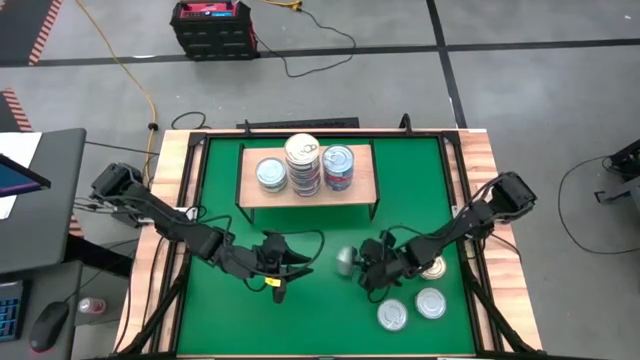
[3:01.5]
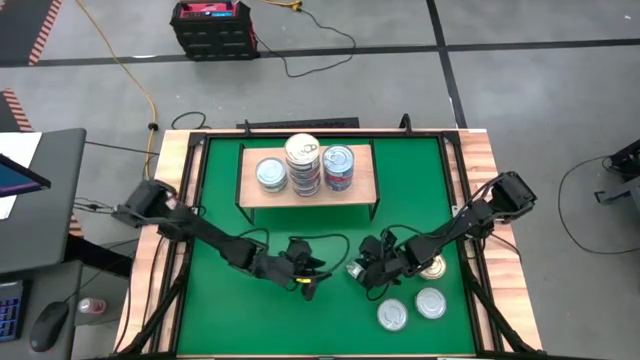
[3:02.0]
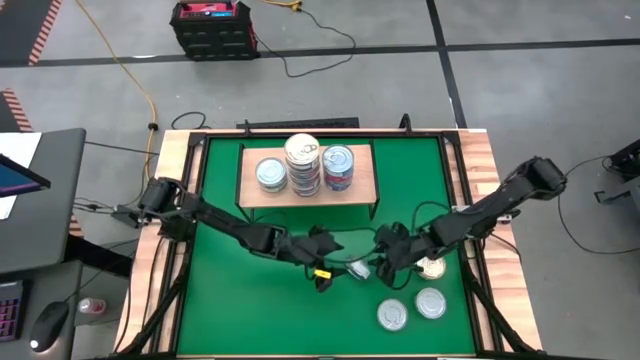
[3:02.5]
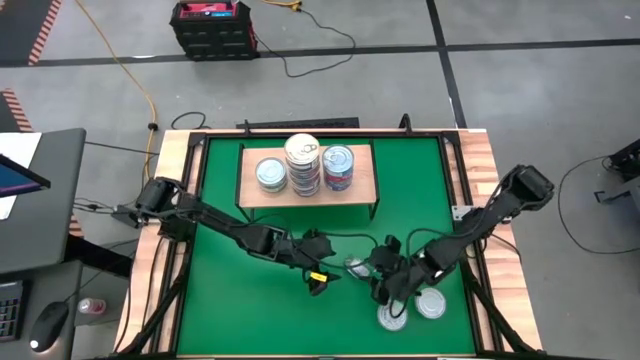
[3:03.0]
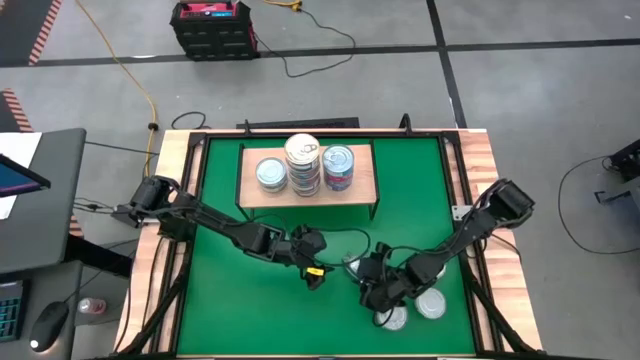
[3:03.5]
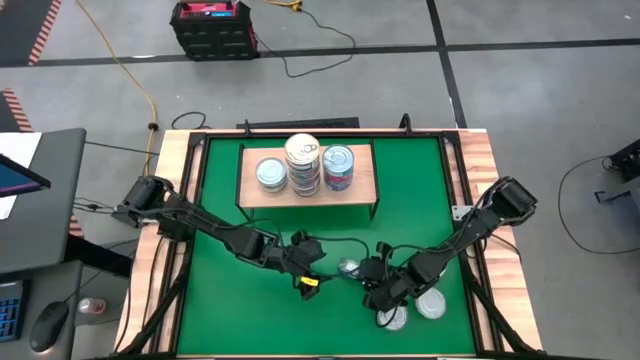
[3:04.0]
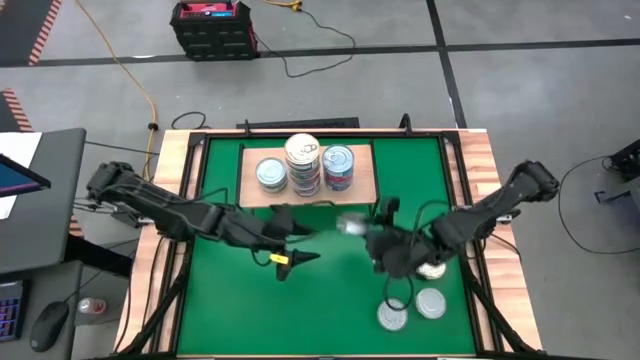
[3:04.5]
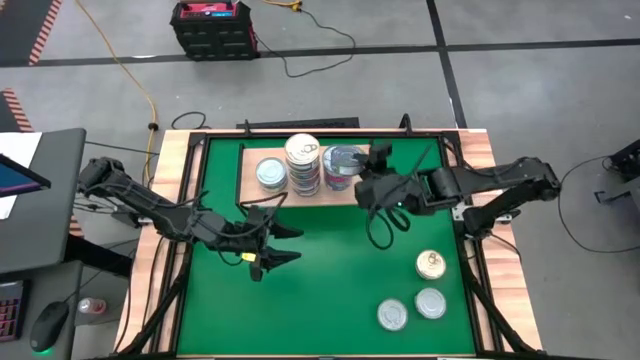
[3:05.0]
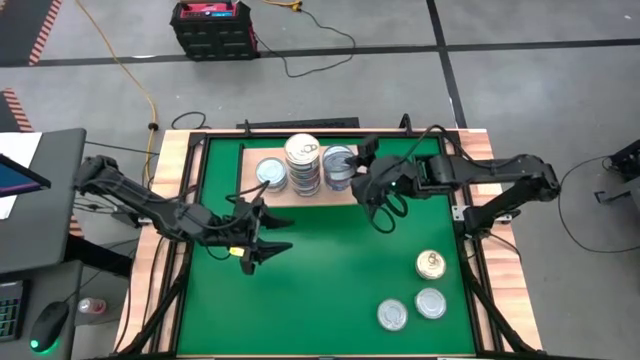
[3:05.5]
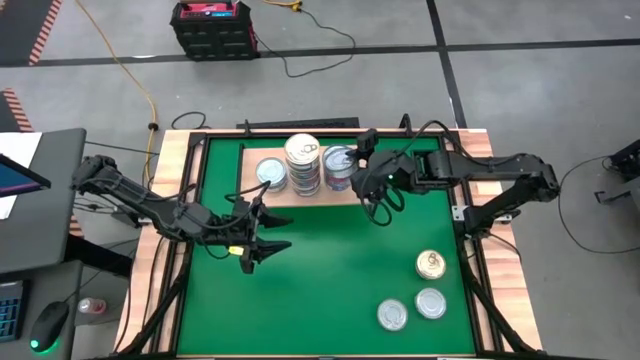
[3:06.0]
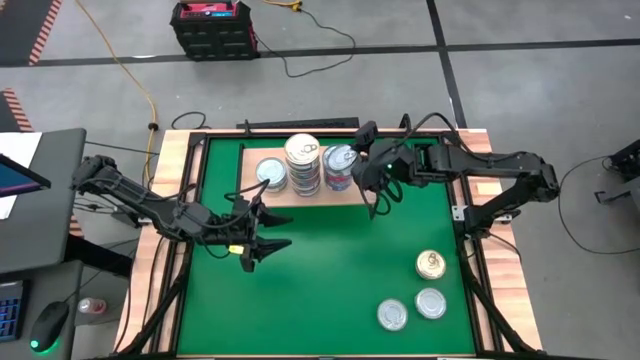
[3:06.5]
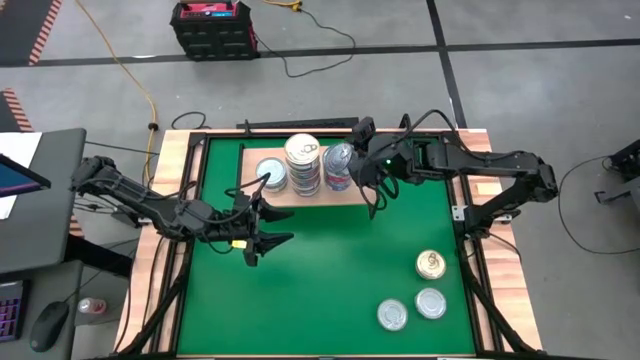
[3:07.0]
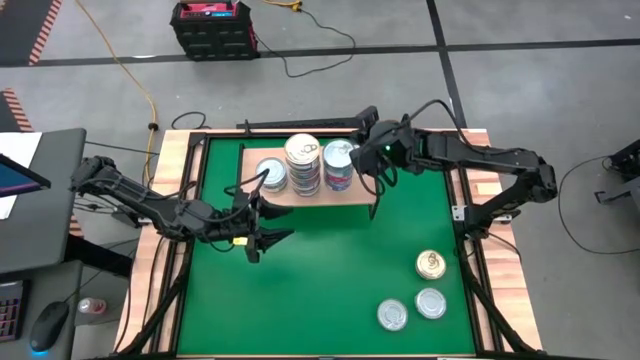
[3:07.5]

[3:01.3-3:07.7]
Task: Stack canned seafood by type on shelf
Stack the green tuna can on top of the colored tuna cans

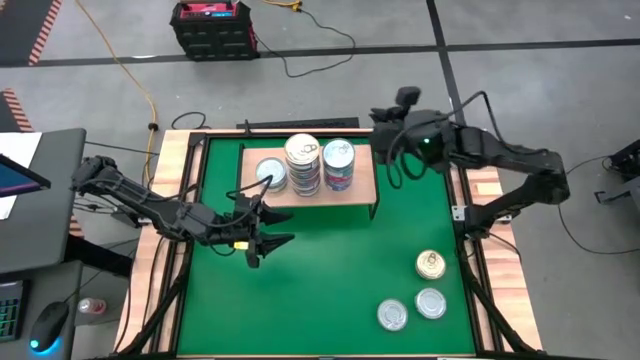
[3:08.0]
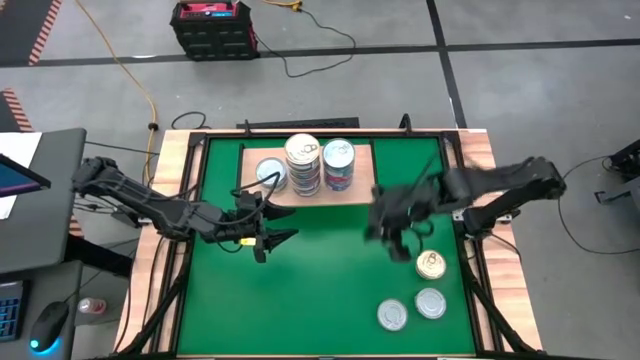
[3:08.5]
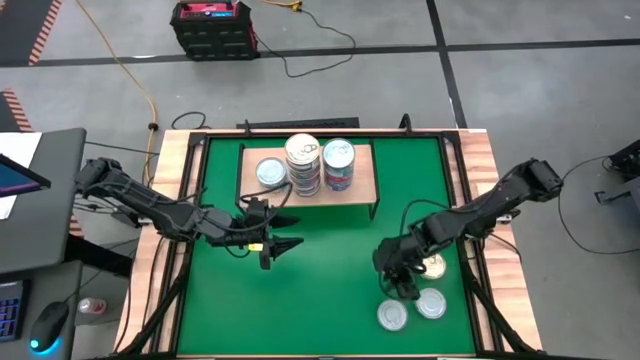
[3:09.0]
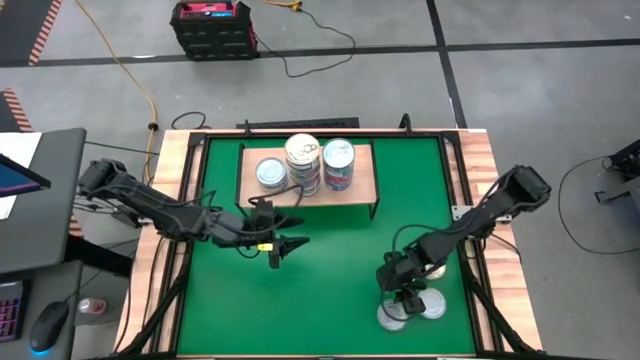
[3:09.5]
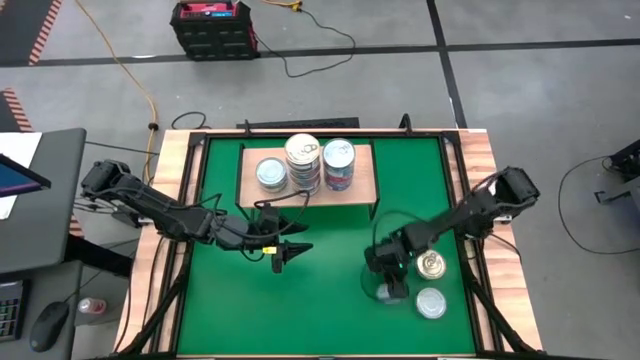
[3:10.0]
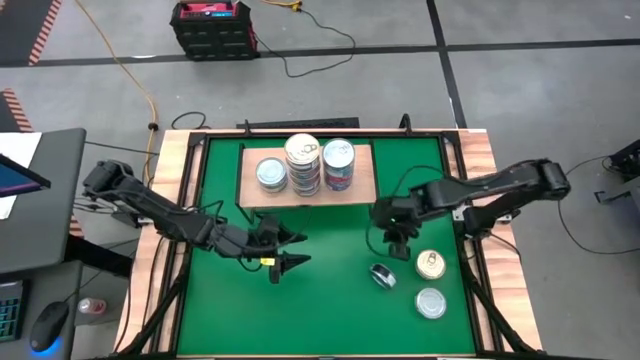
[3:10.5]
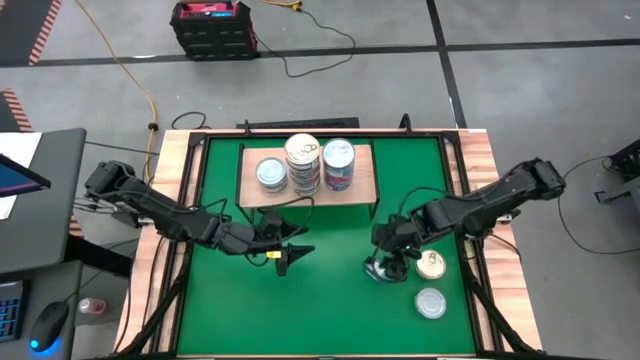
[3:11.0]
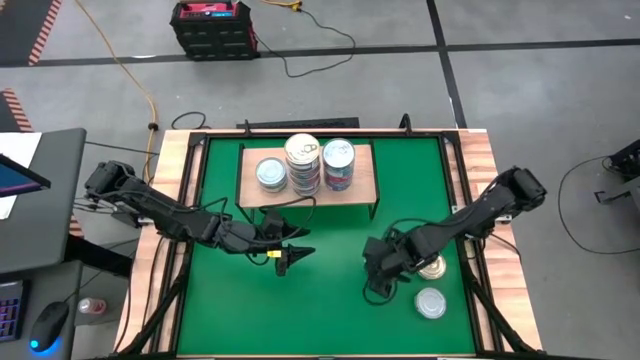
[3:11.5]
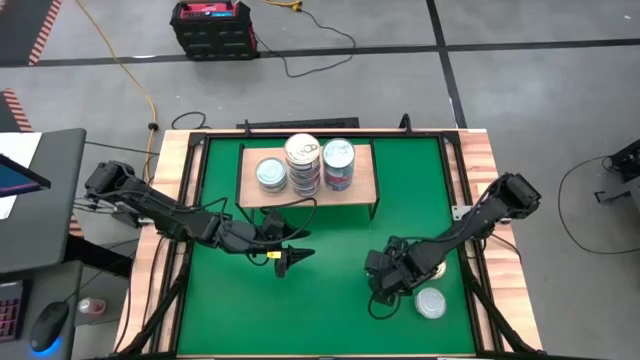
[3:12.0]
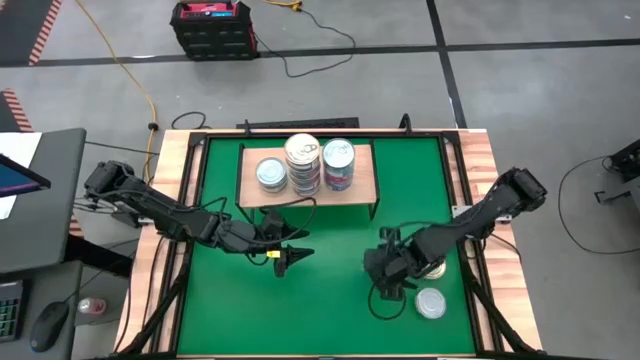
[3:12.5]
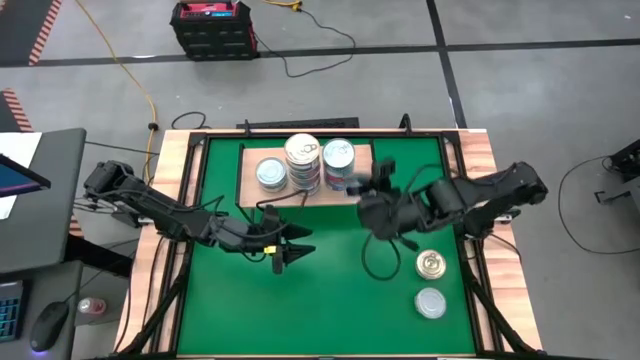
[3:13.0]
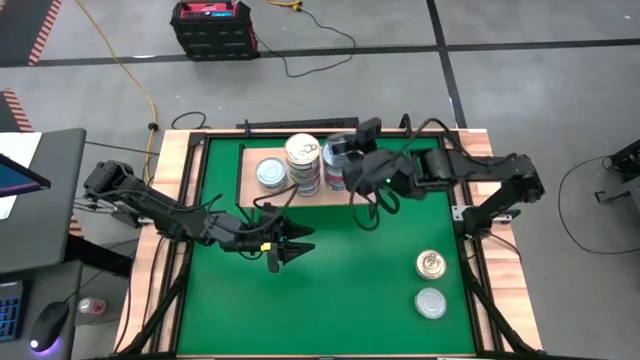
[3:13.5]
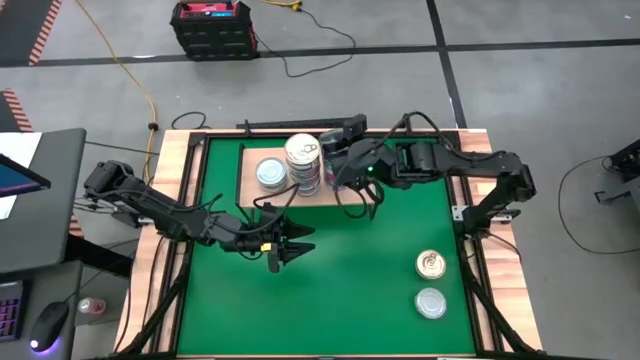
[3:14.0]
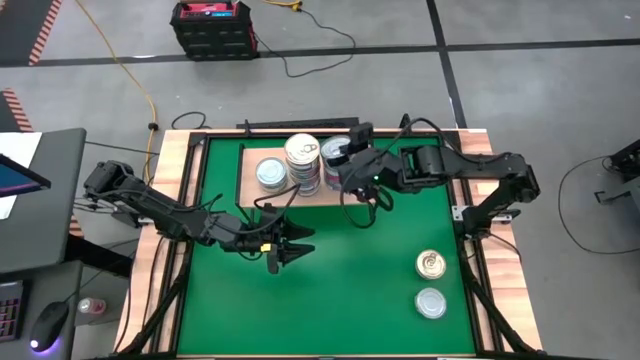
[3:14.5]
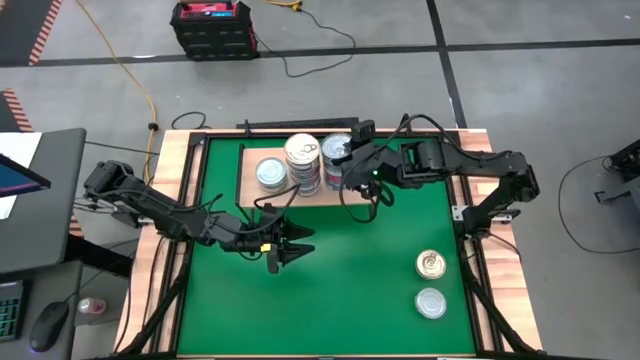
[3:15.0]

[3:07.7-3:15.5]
Stack the blue tuna can on top of the colored tuna cans

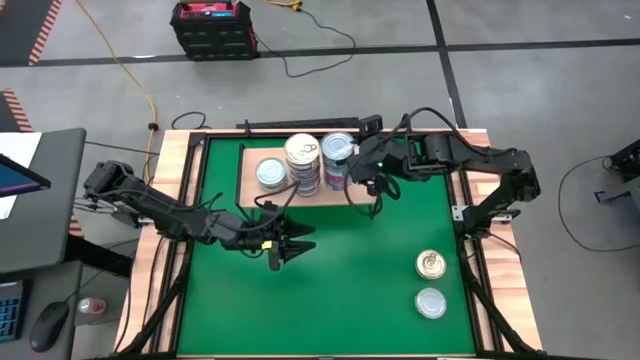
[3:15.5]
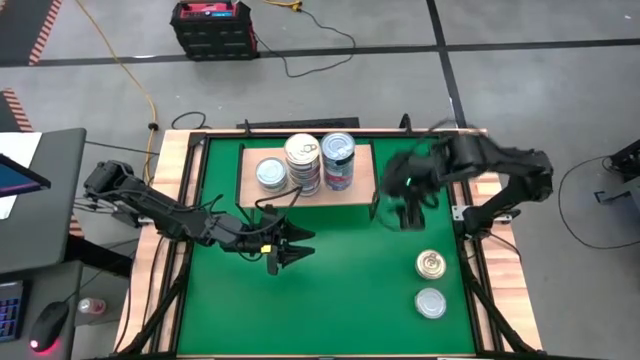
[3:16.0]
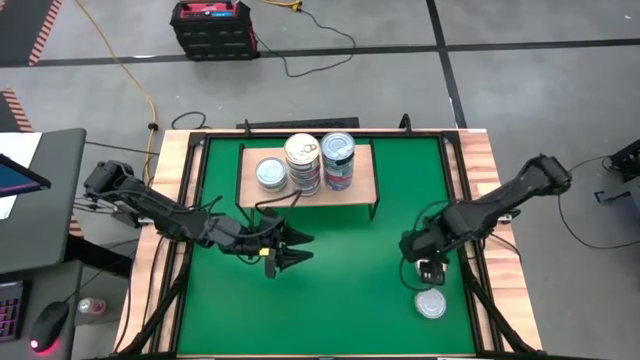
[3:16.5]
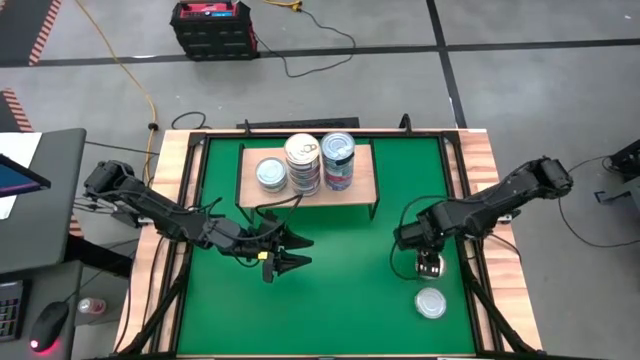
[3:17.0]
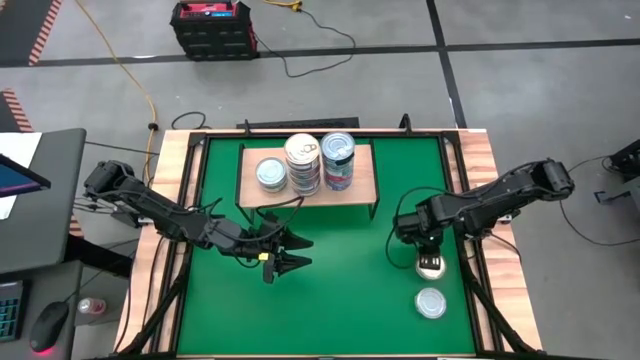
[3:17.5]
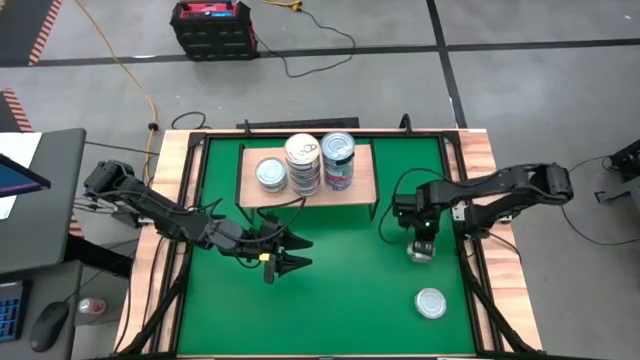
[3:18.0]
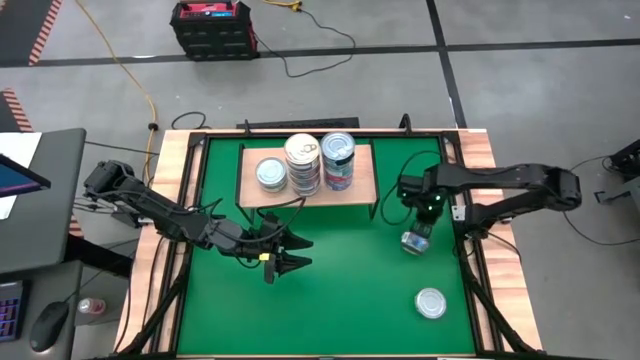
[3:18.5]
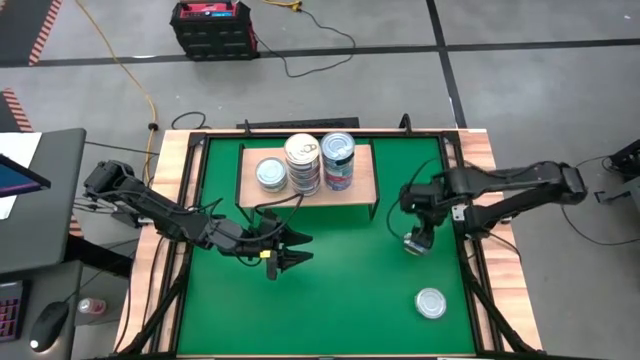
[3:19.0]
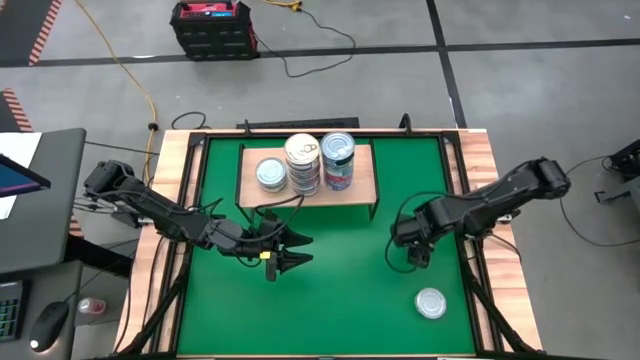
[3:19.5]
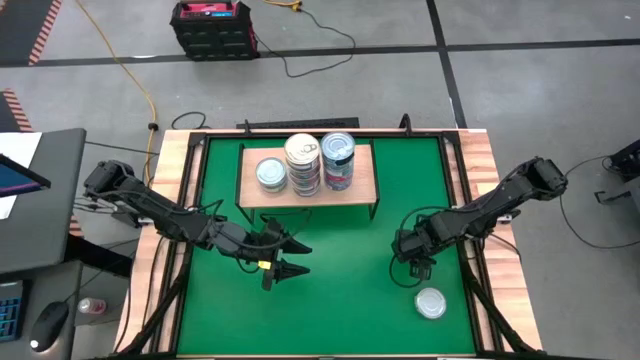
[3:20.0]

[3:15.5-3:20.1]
Stack the pink tuna can on top of the pink tuna cans

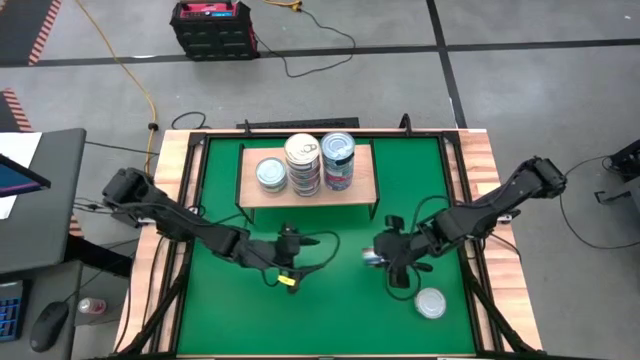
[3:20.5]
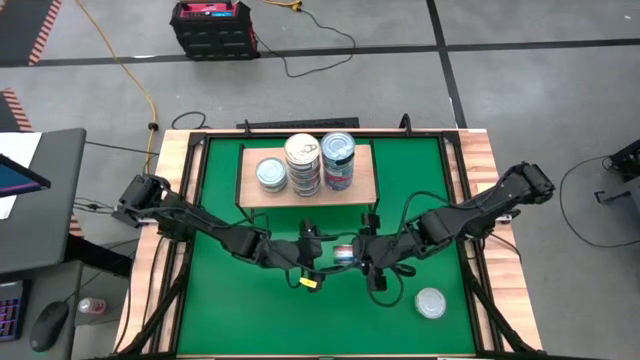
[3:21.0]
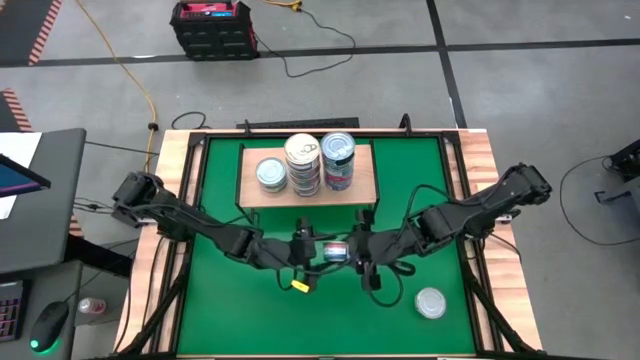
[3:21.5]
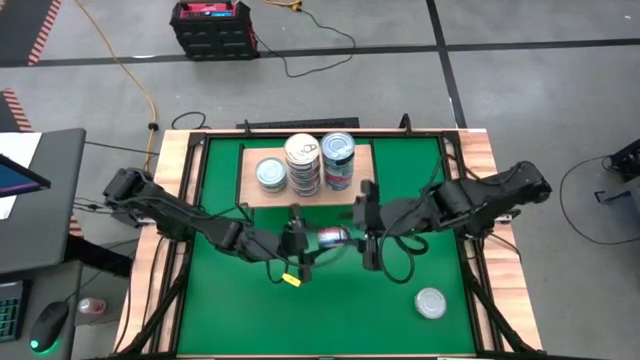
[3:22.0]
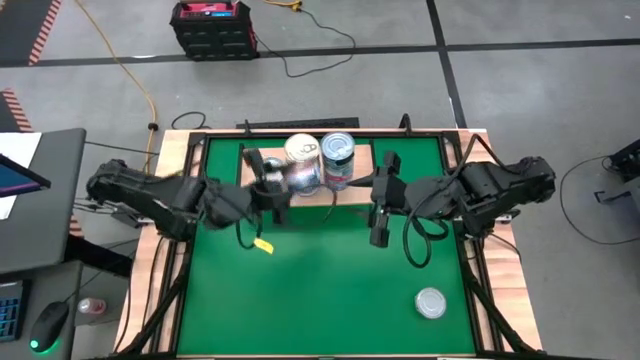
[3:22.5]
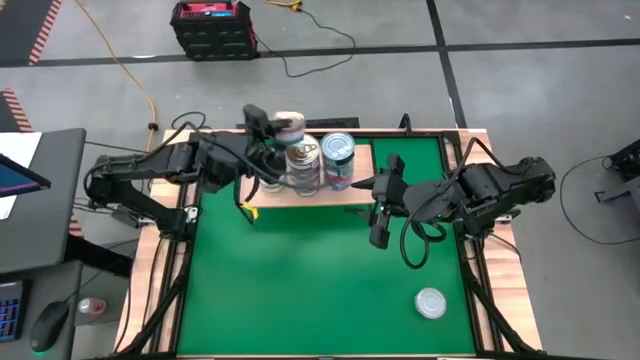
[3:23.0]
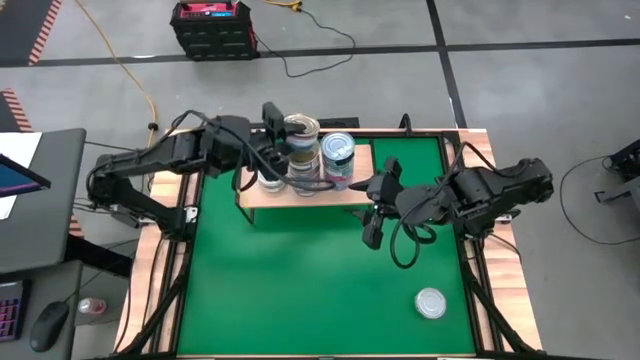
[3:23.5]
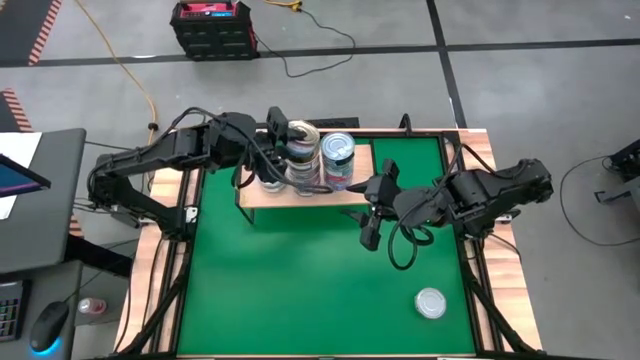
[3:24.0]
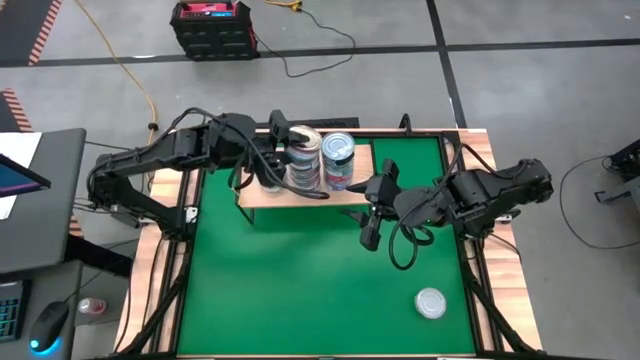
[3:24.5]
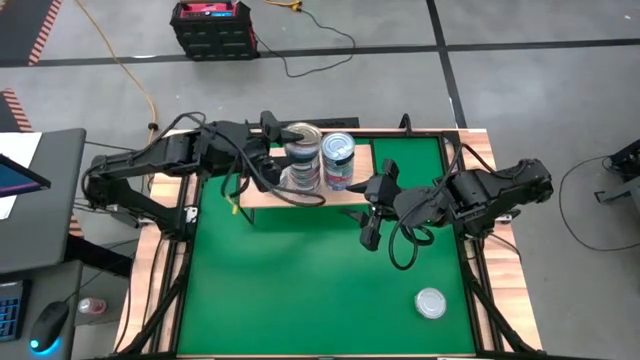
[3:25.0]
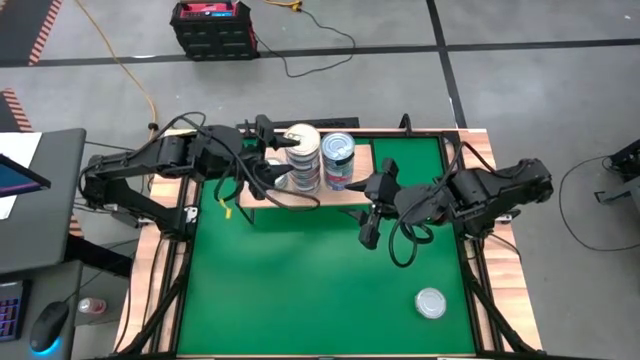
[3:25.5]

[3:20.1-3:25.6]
Stack the pink tuna can on top of the pink tuna cans
